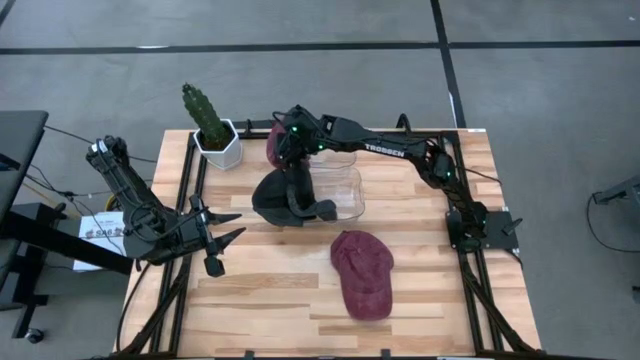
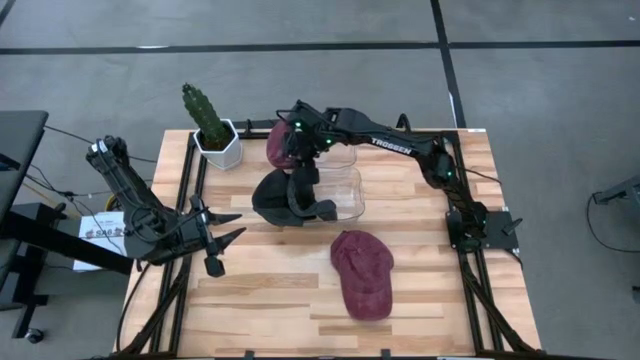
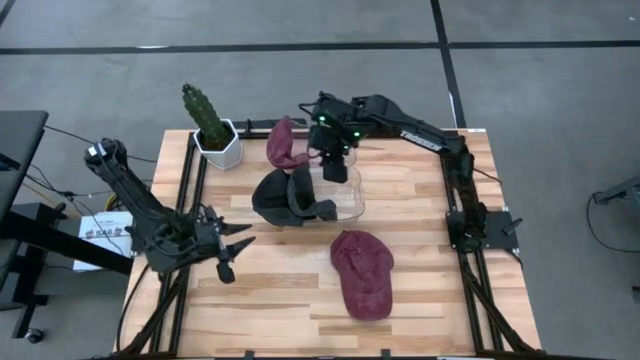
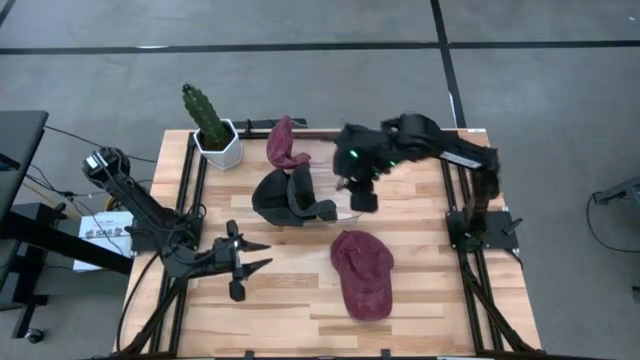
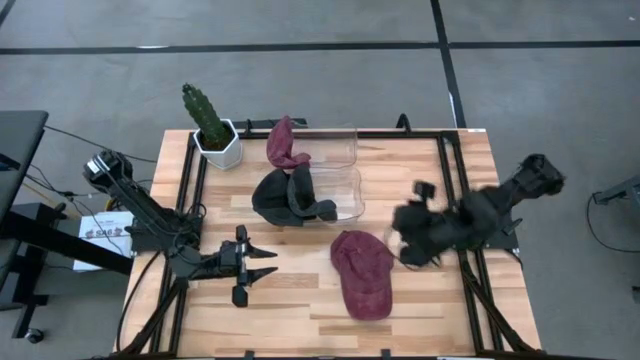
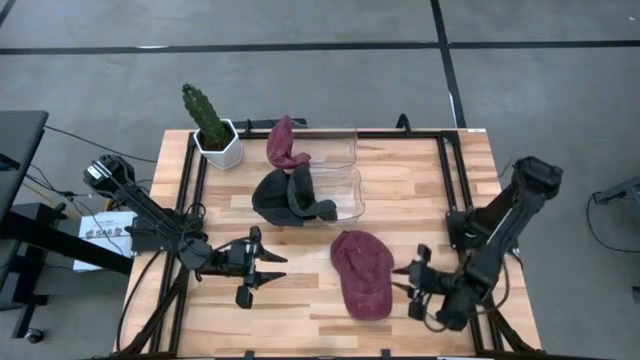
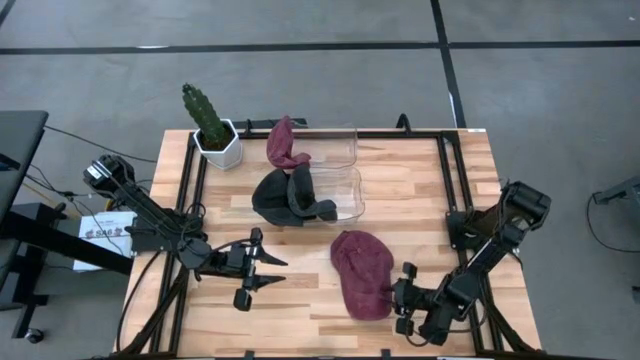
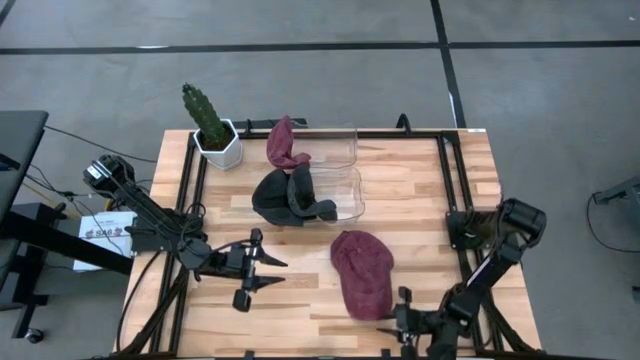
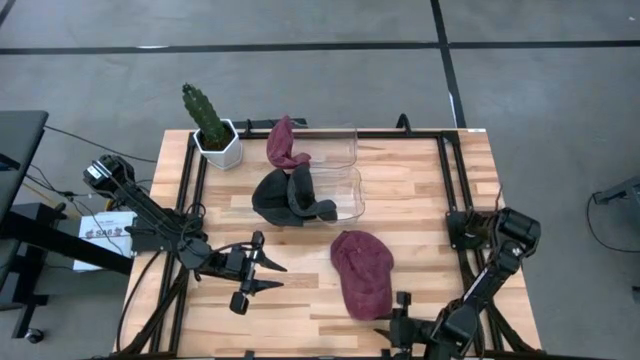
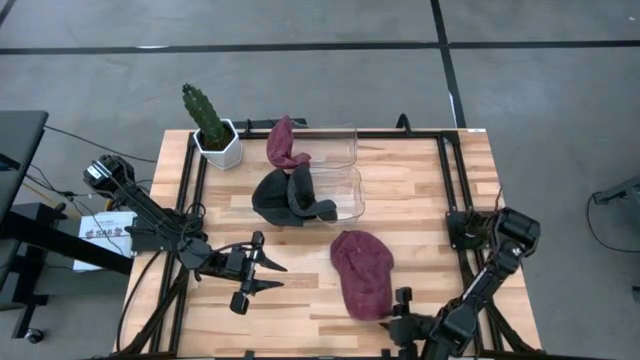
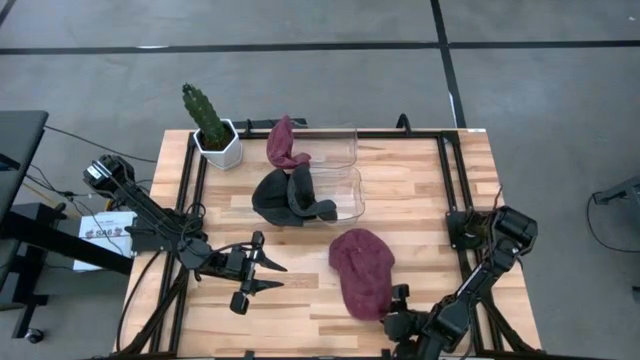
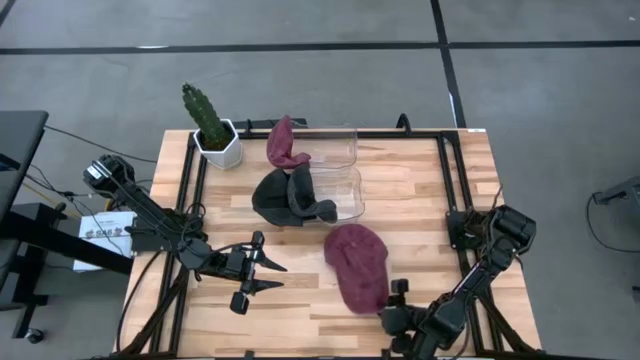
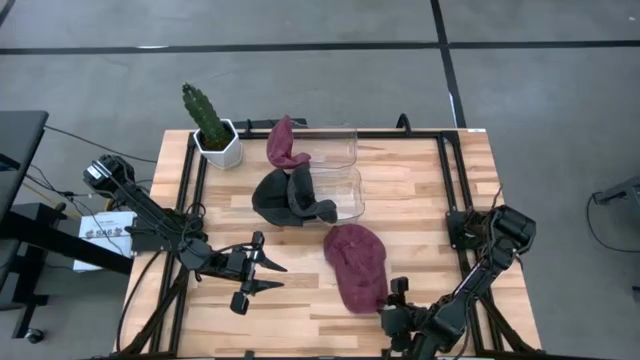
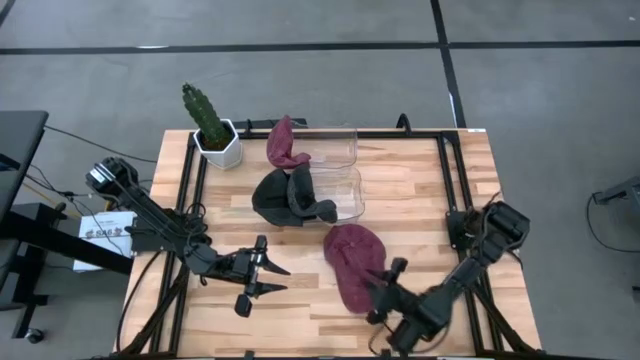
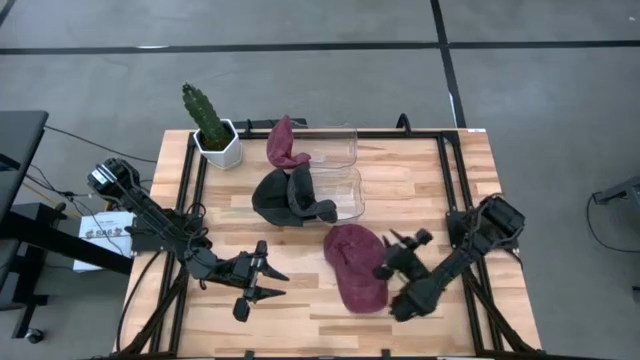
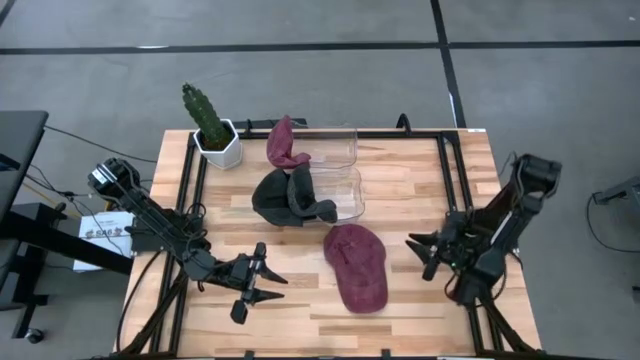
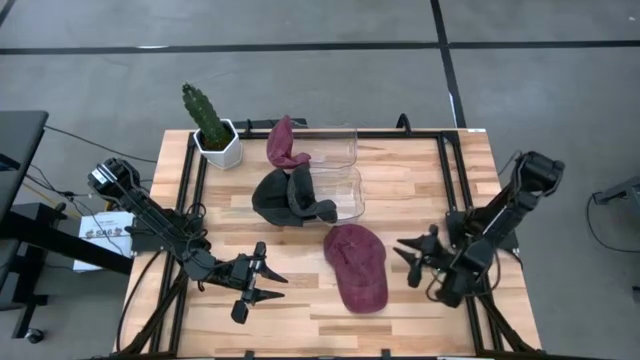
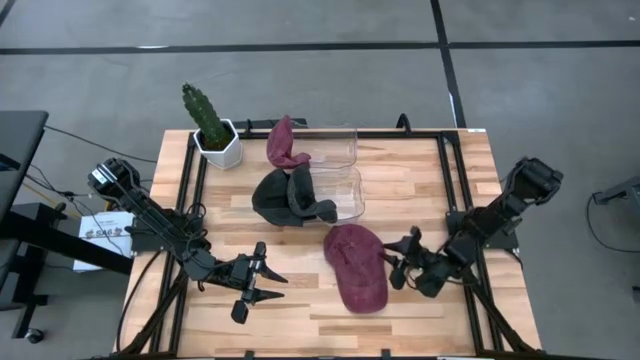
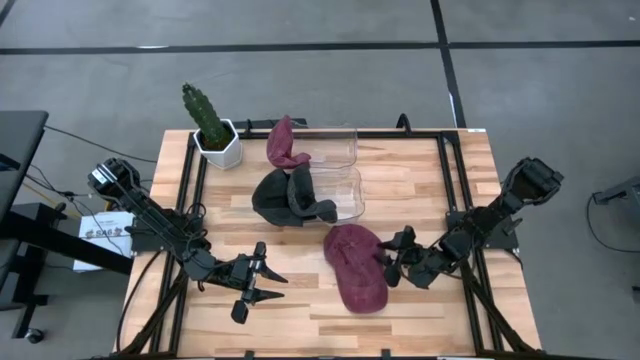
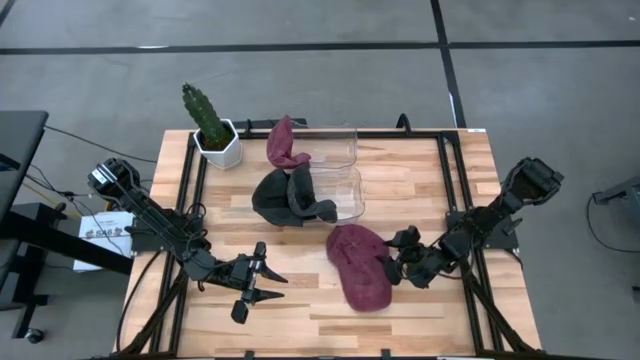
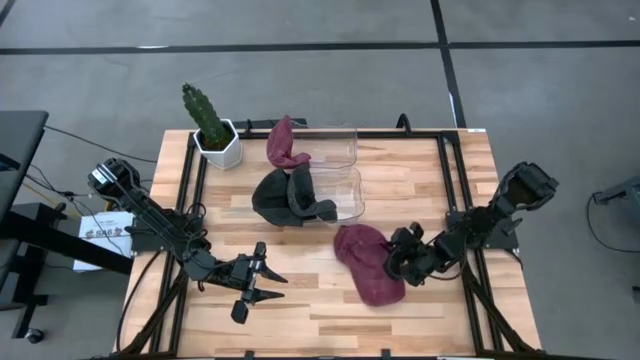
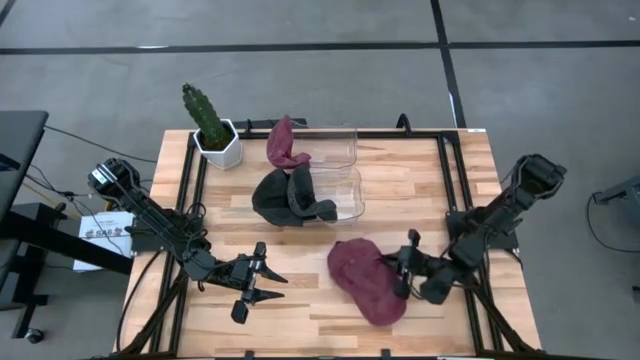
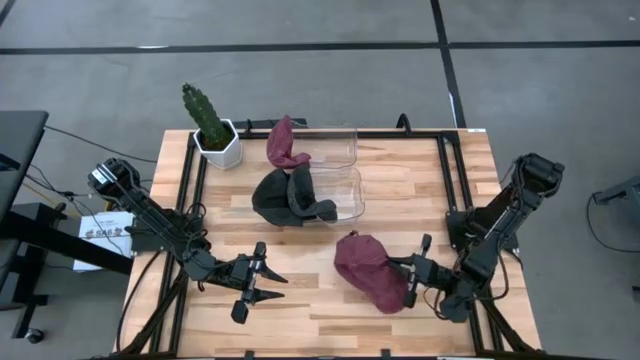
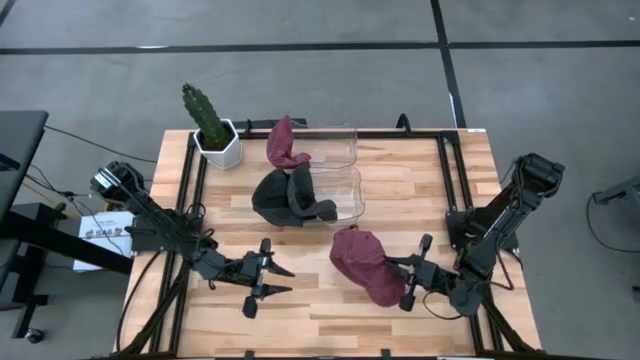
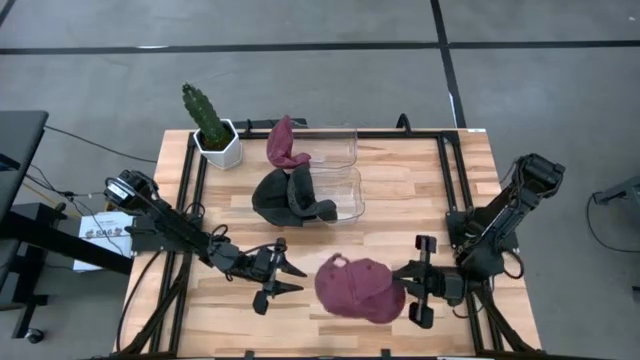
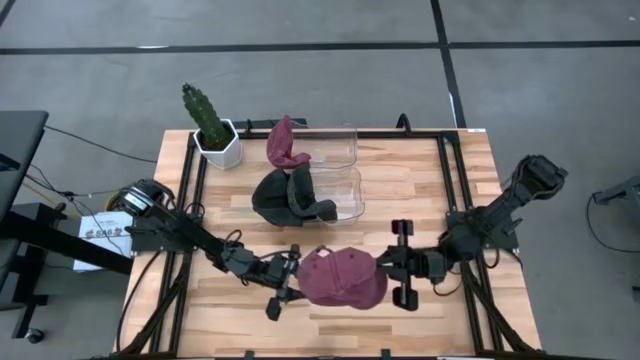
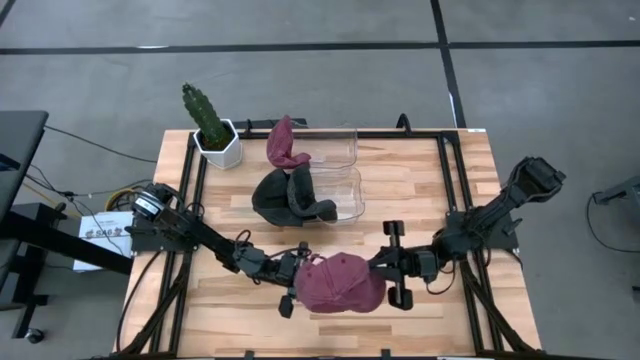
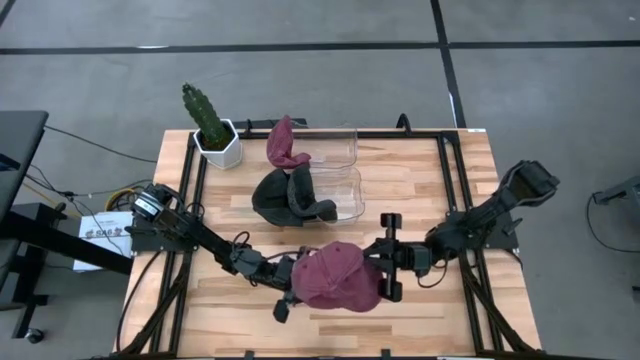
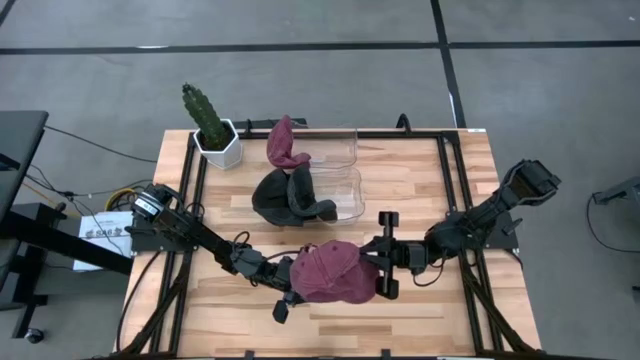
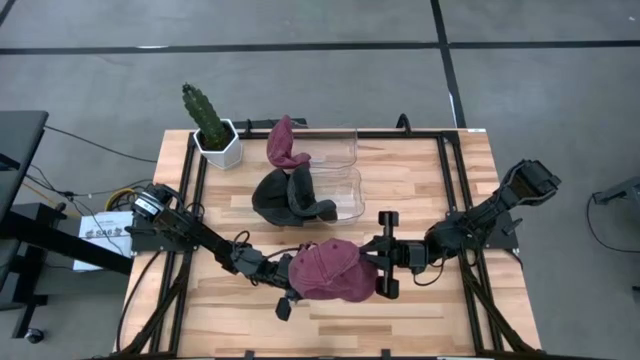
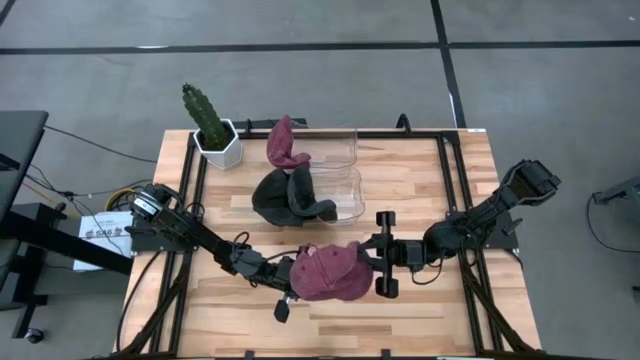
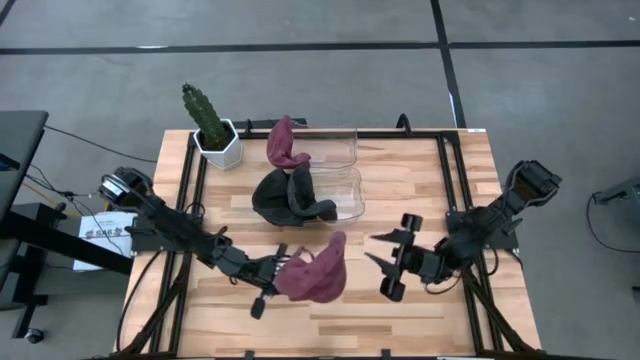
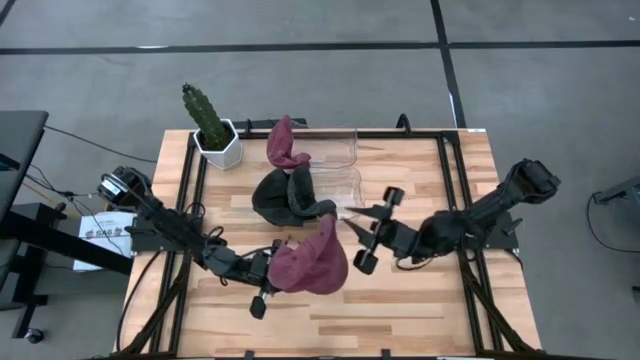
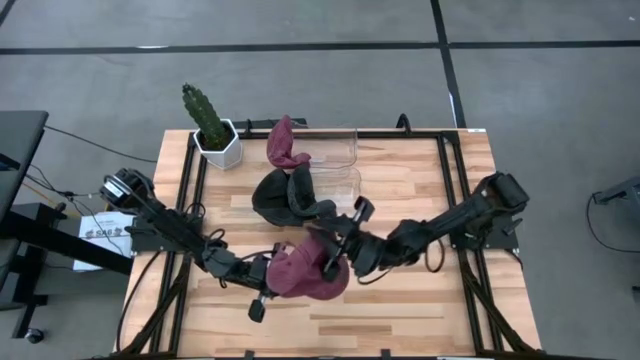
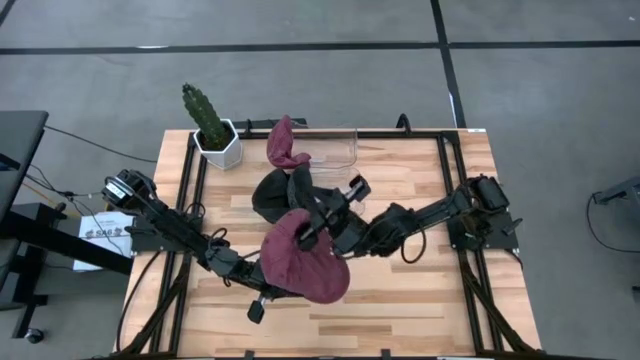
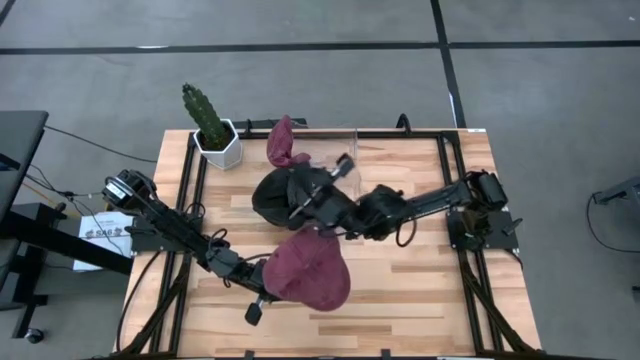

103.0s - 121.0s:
Task: Pick & Place hat
Put the red cap into the top transparent bin

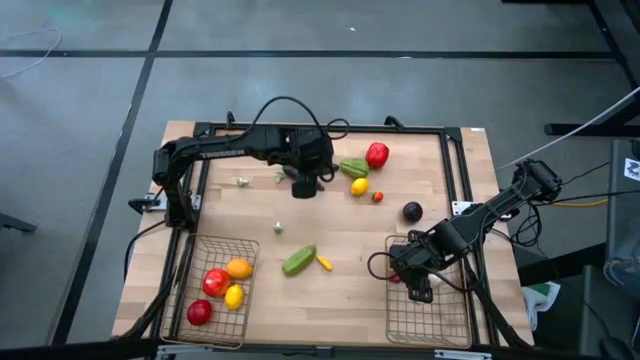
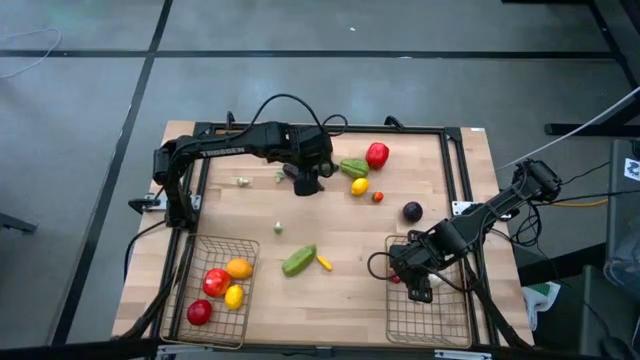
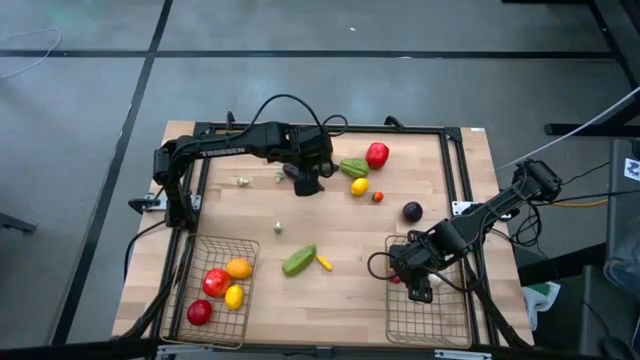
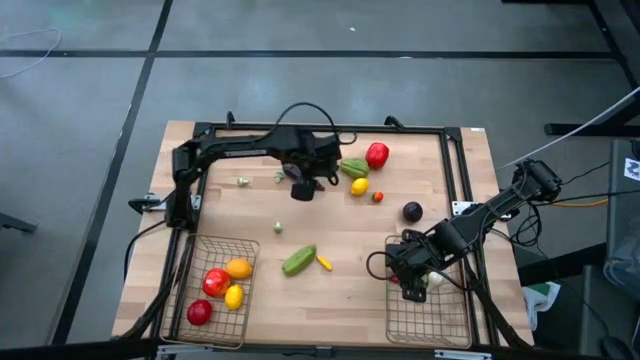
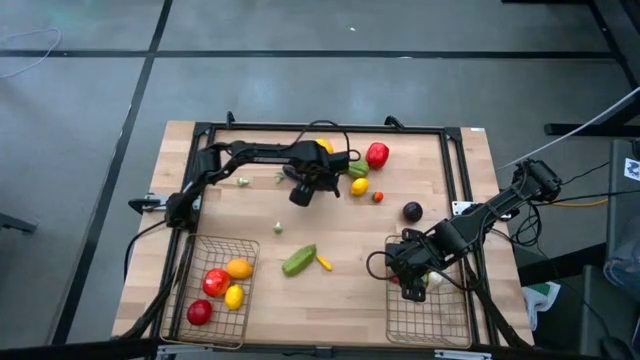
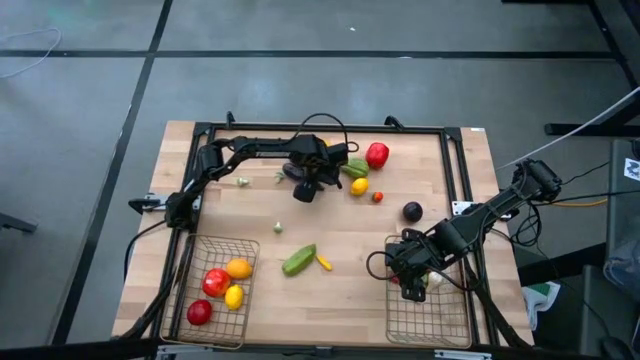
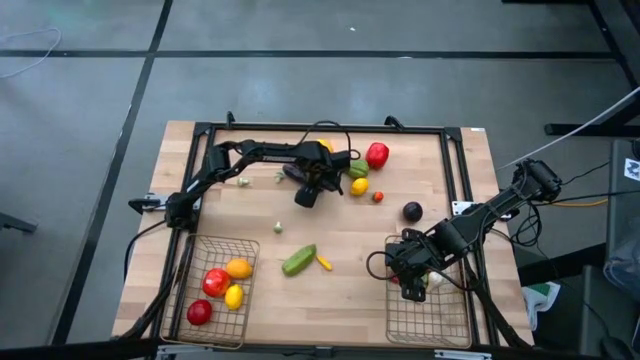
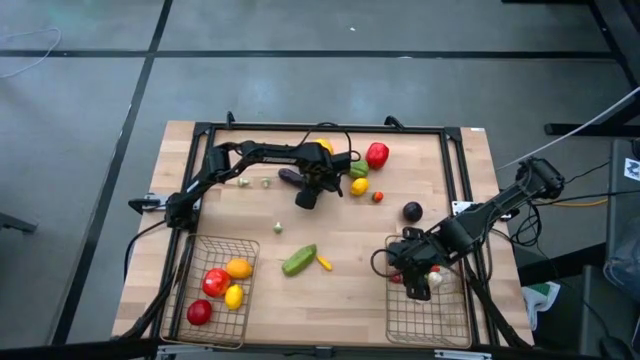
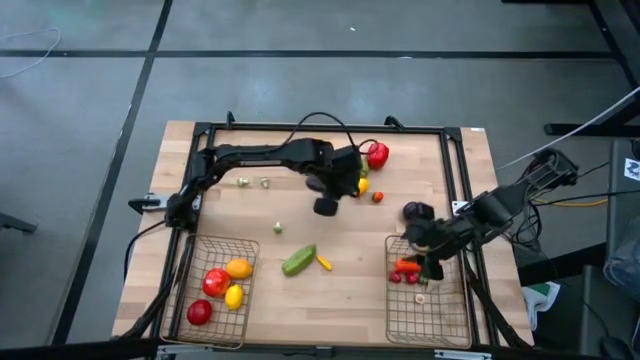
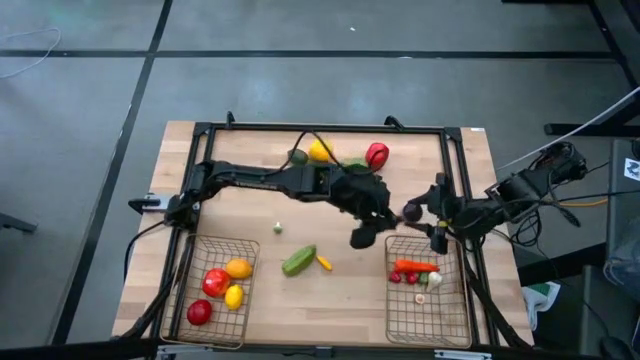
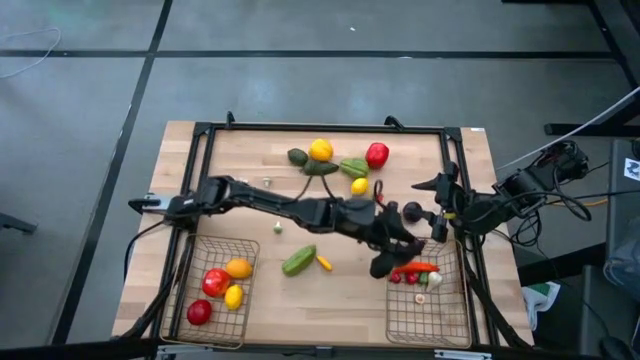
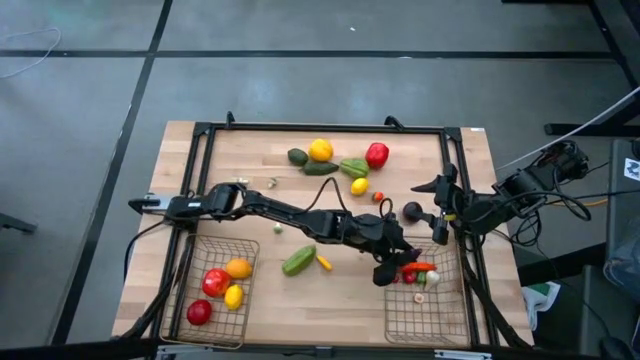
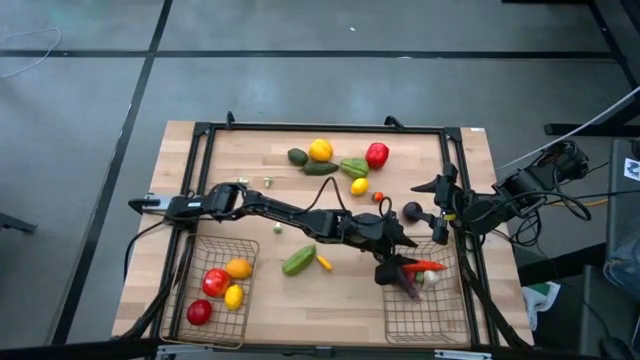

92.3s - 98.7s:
Task: Sort produce into baskets
Put the purple eggplant into the right wire basket
